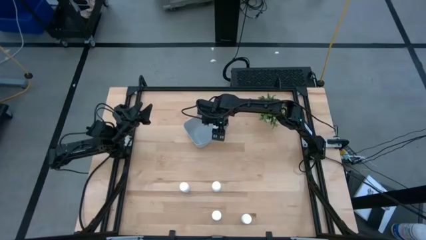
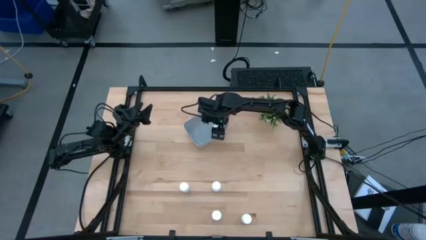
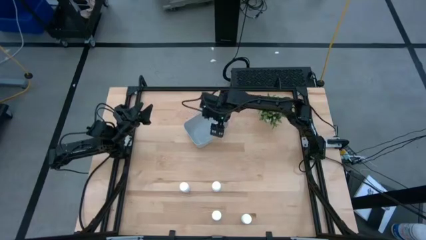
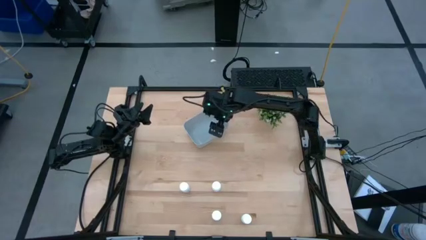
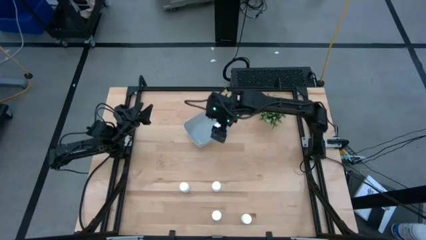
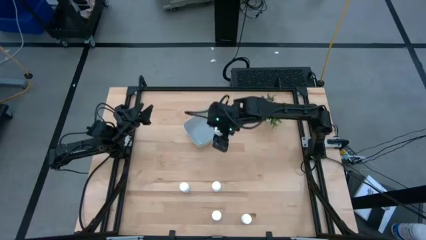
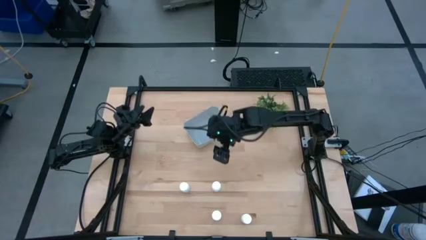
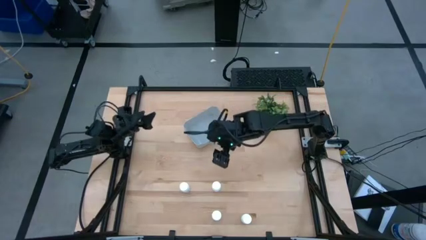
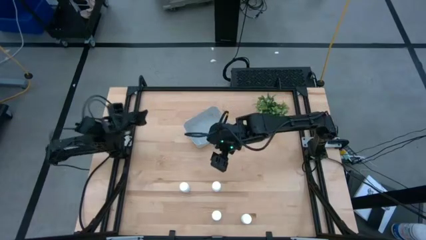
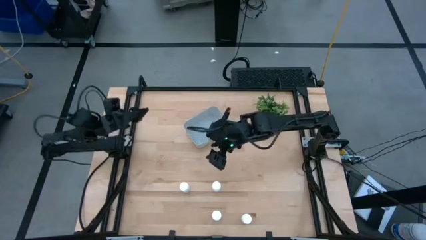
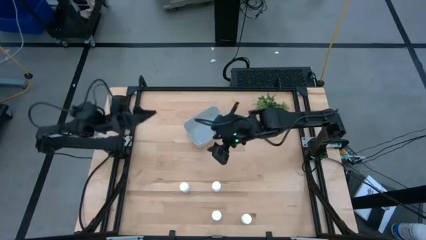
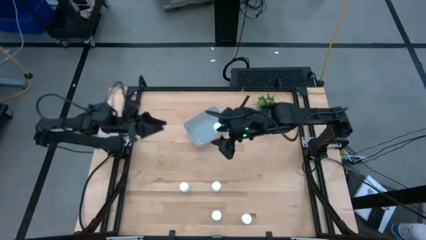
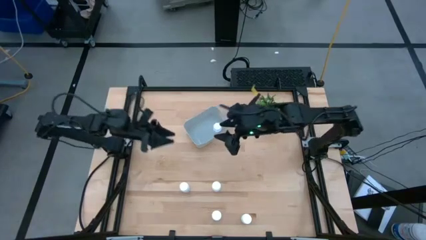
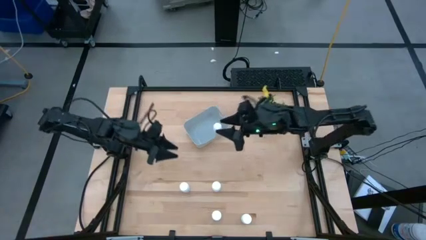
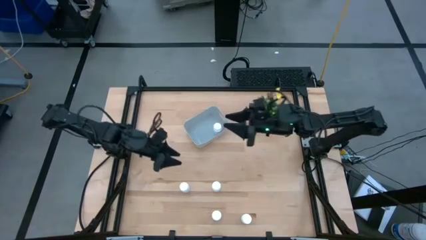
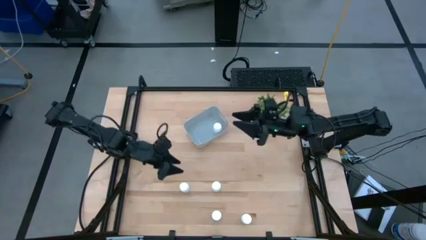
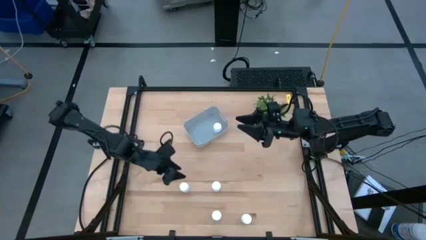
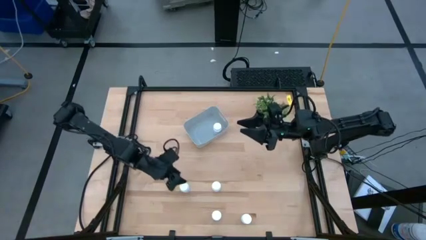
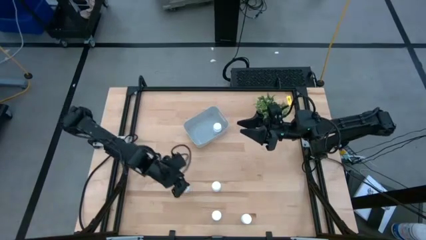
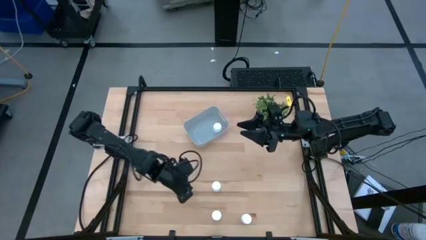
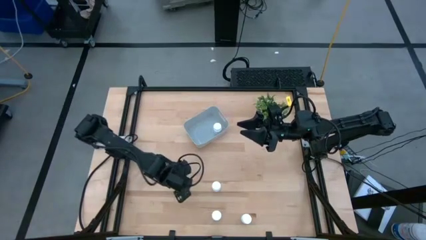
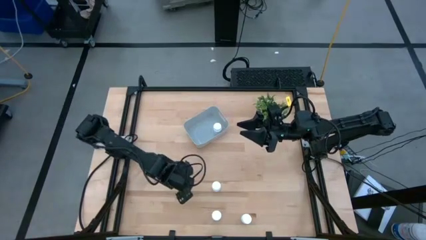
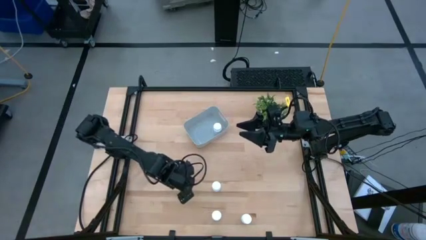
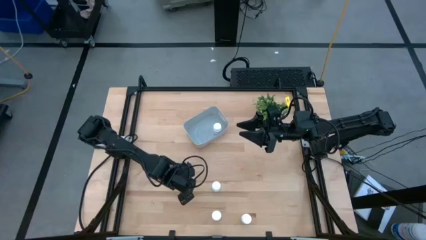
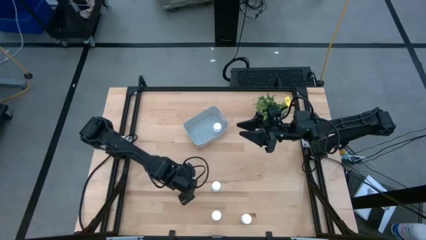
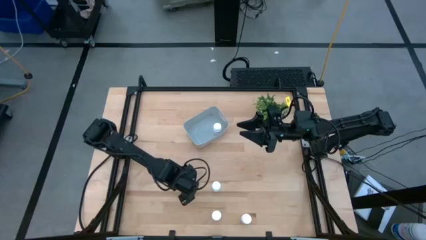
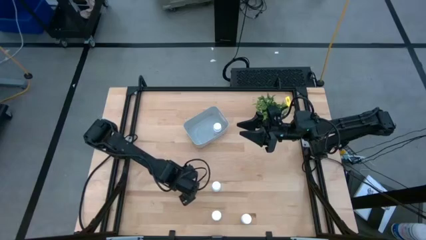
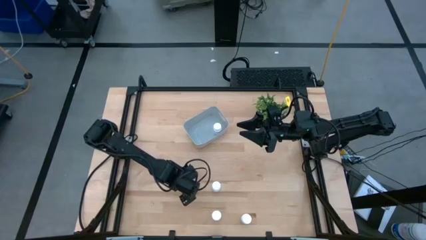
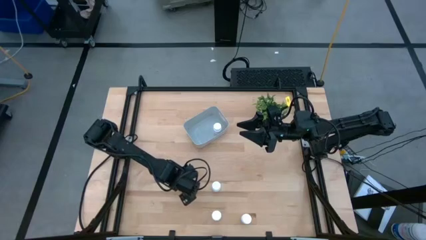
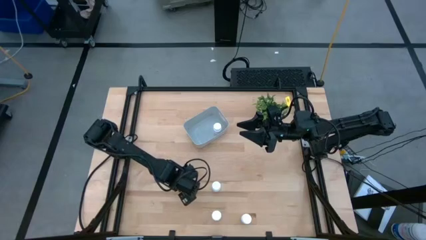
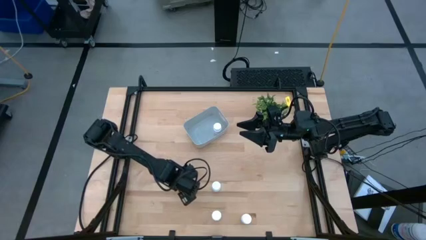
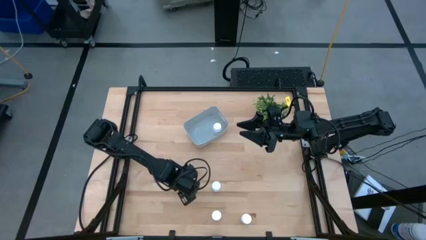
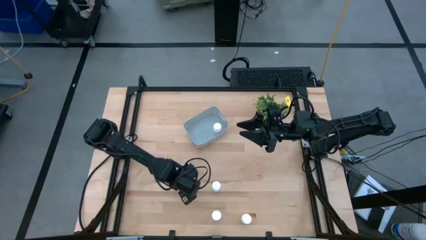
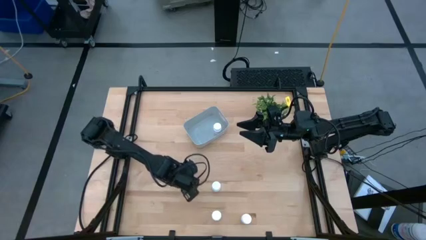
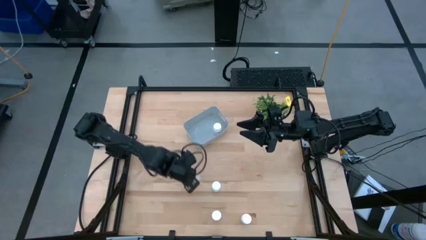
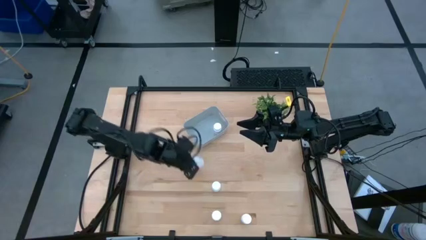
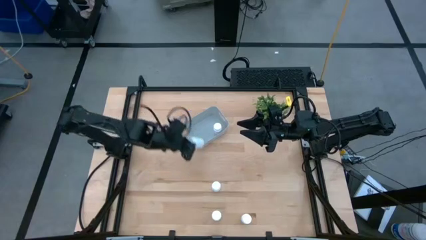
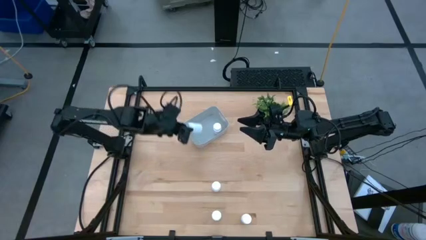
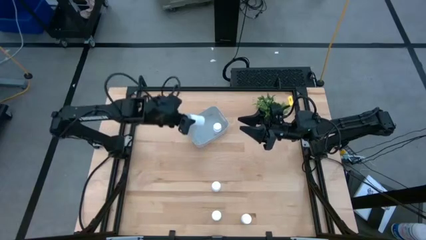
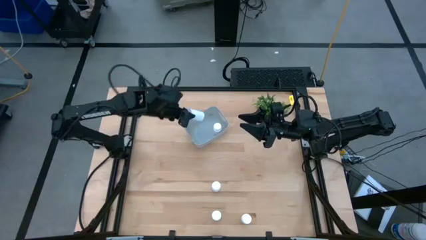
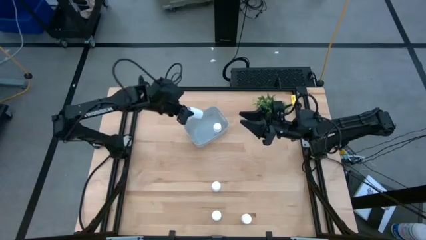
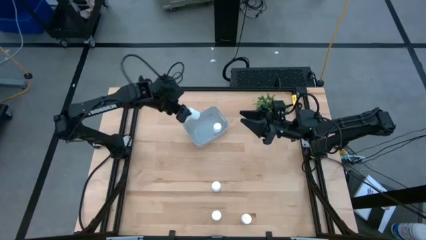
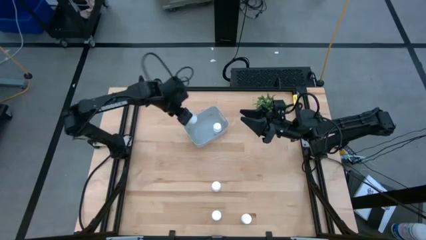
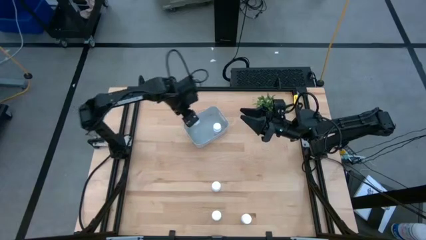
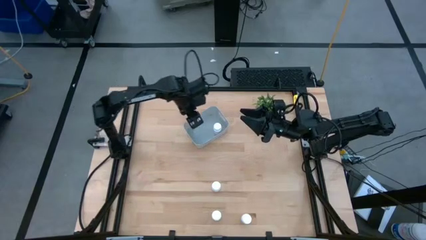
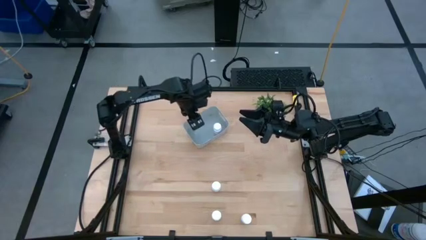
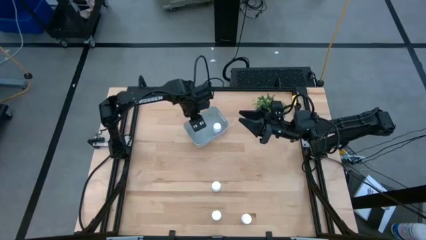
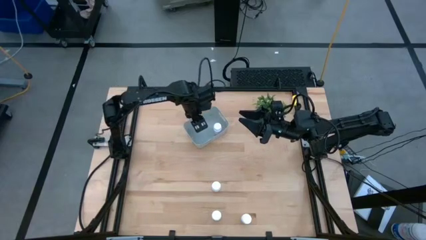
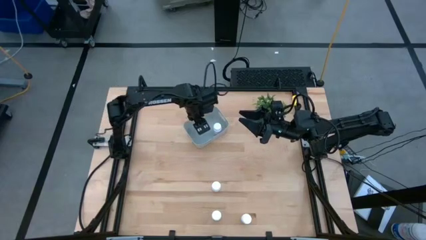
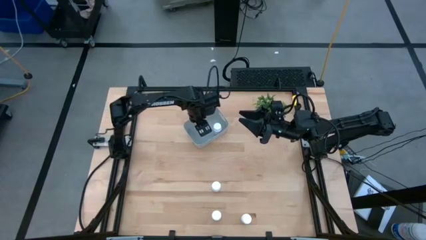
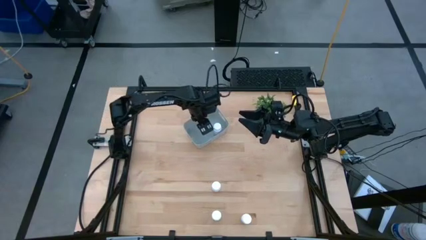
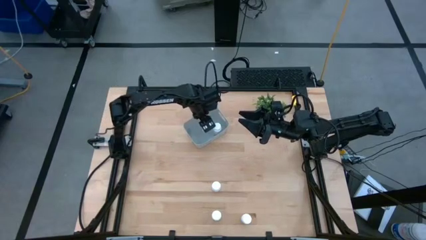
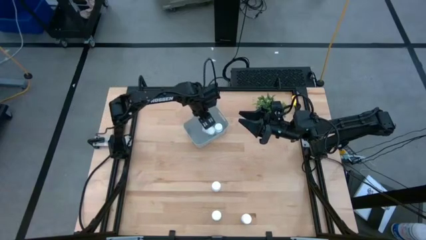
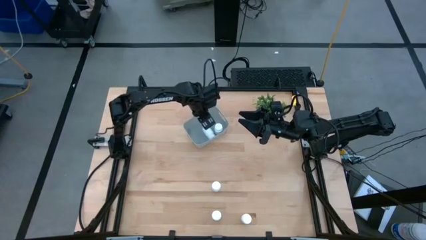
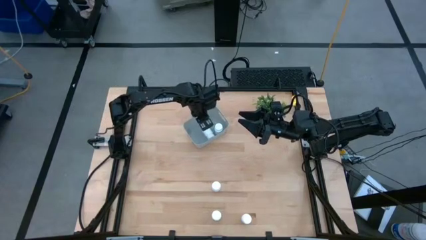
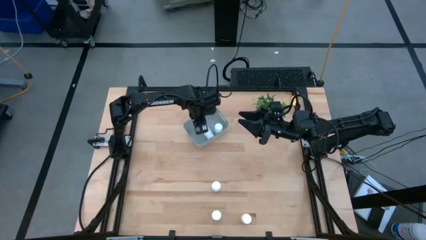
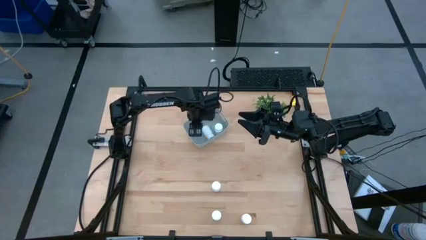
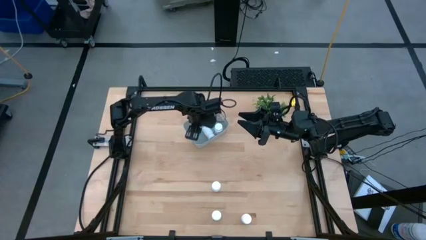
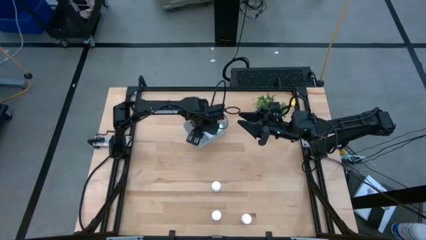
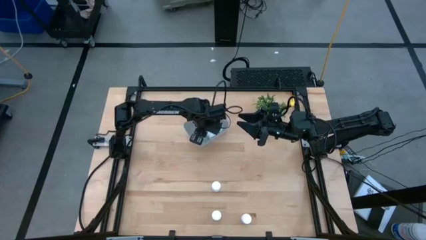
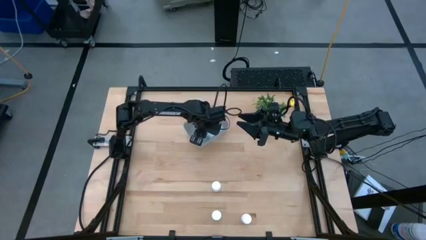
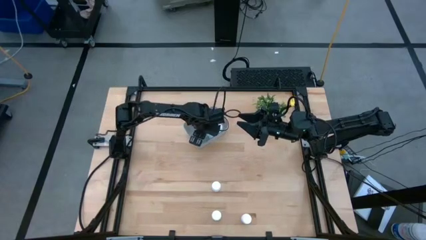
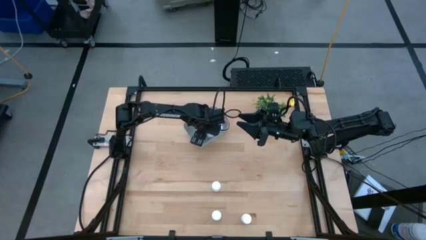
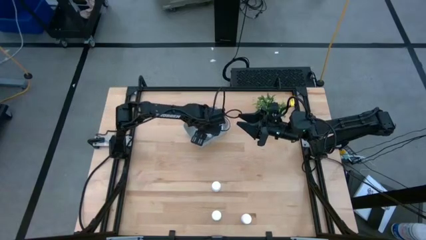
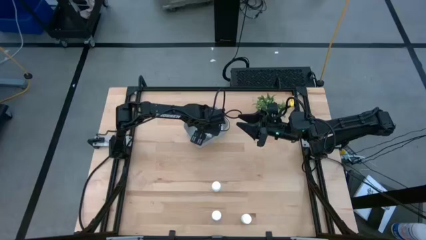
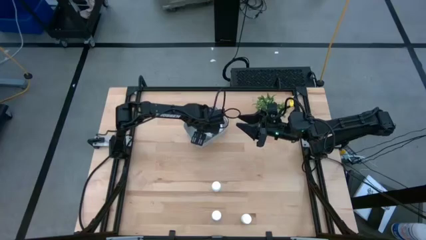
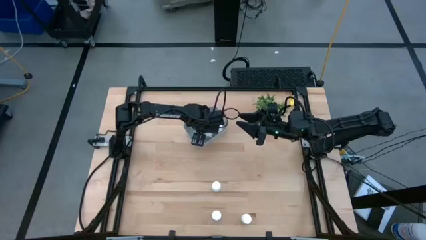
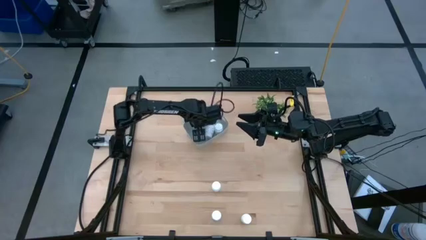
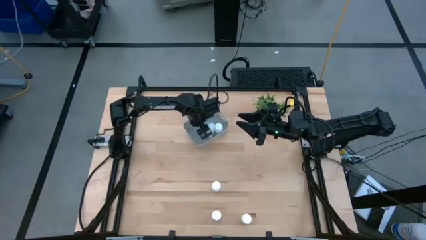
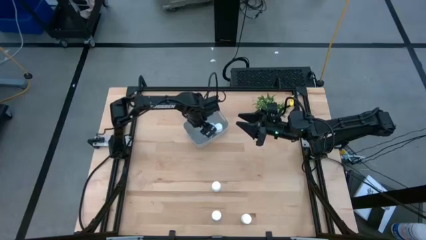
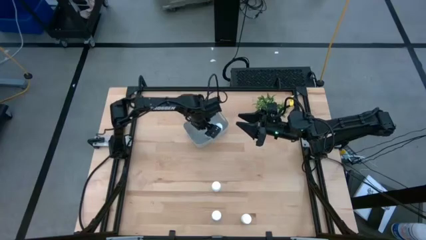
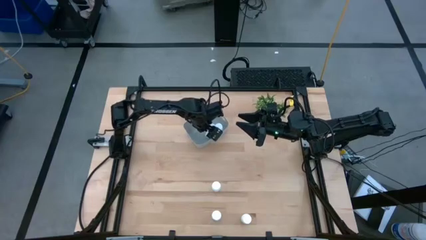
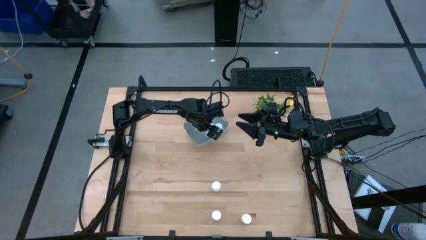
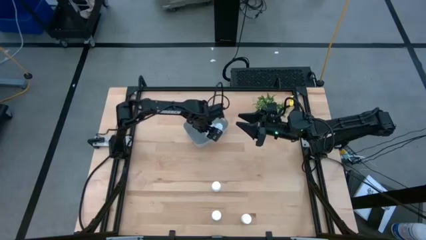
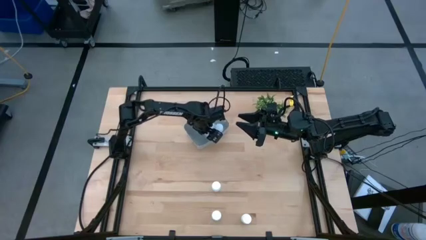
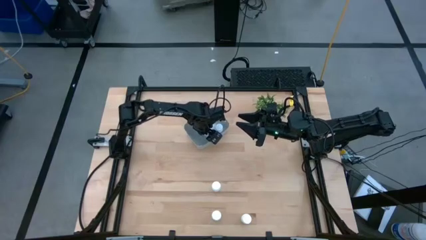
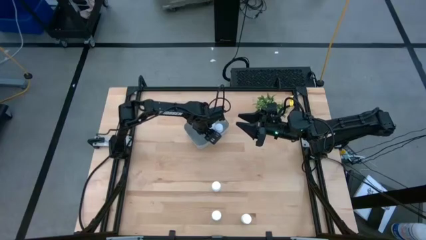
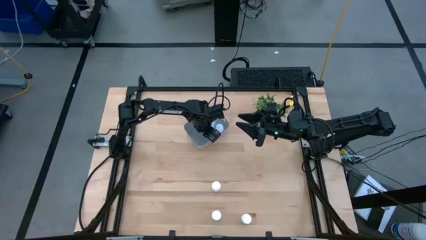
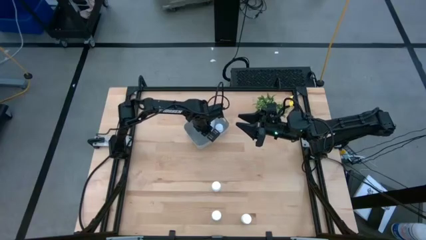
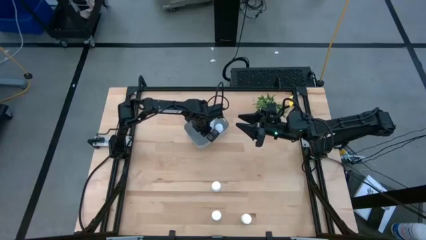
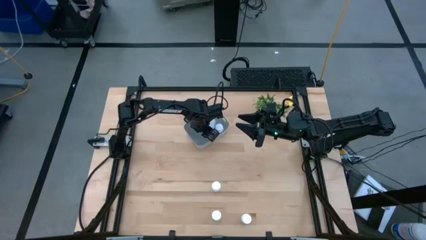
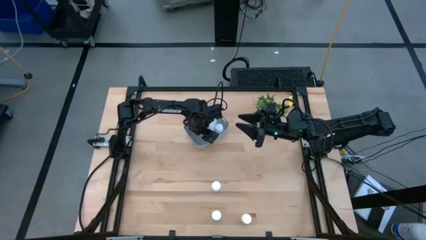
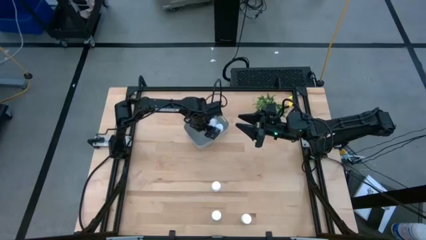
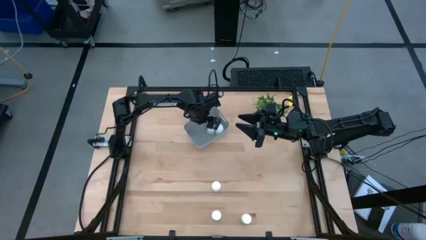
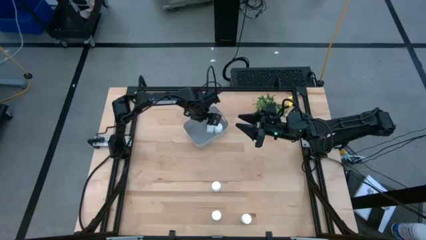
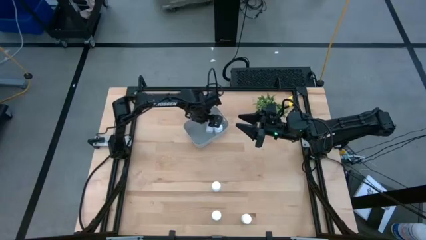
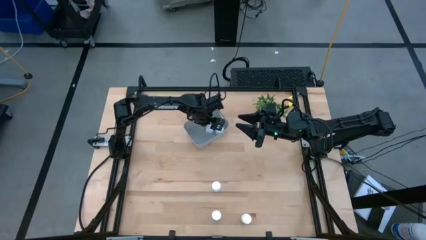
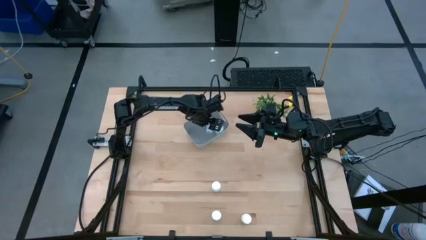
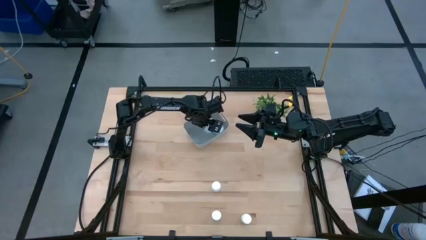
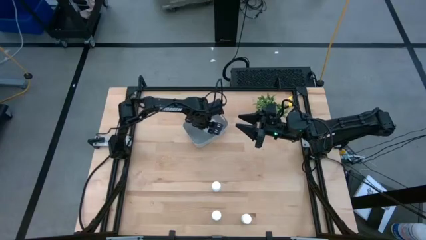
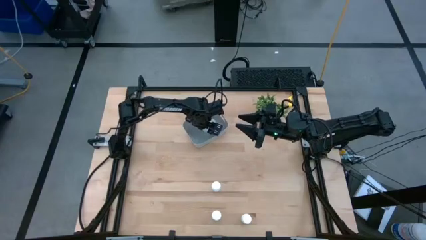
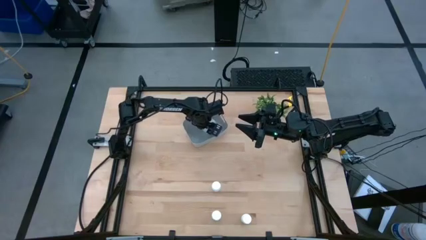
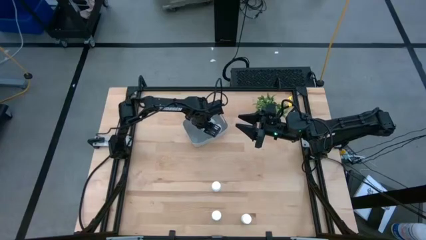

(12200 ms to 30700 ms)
Task: Pick and place pill bottles into a basket
Put the white pill bottle into the gray bin
